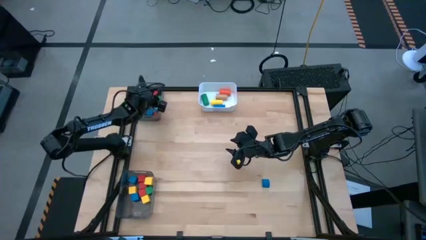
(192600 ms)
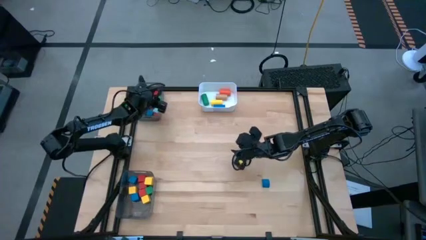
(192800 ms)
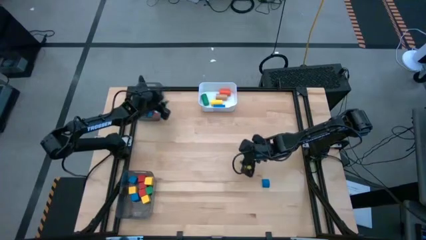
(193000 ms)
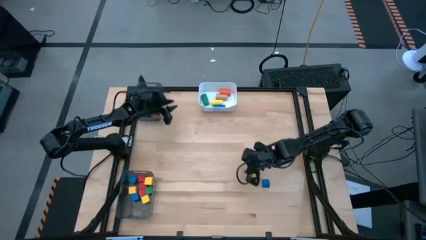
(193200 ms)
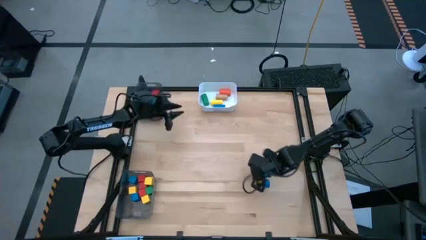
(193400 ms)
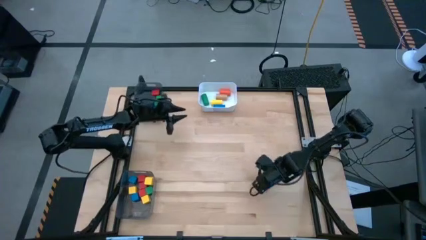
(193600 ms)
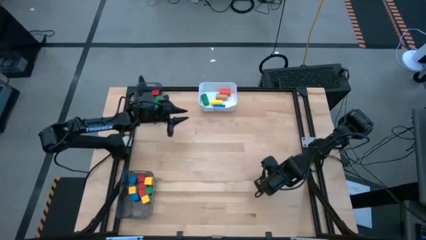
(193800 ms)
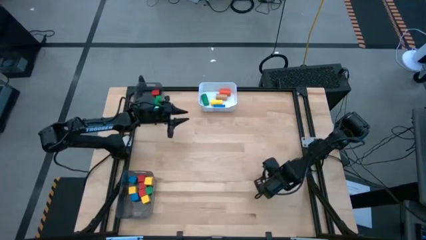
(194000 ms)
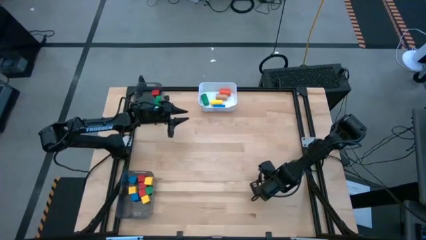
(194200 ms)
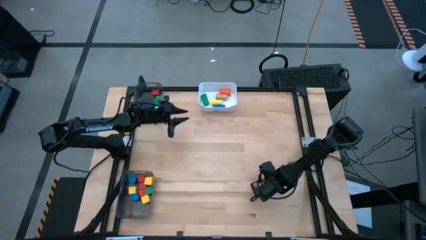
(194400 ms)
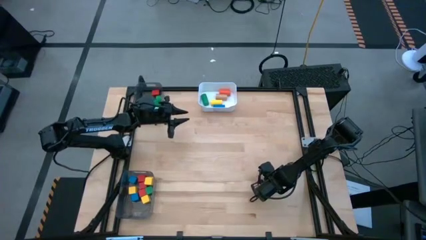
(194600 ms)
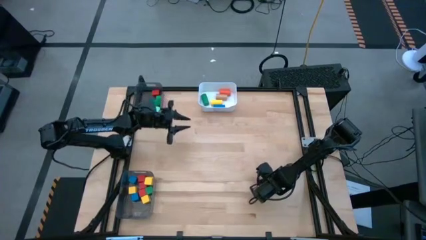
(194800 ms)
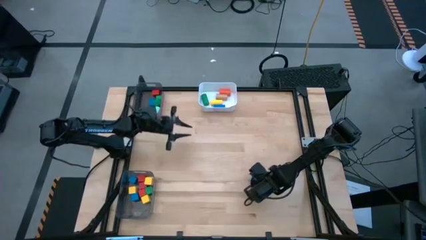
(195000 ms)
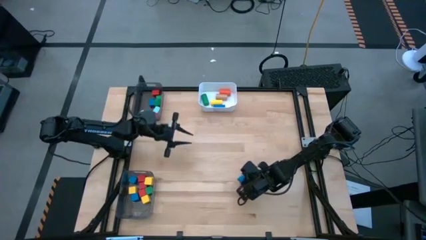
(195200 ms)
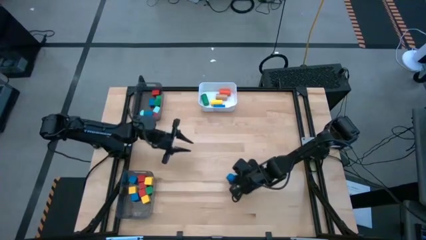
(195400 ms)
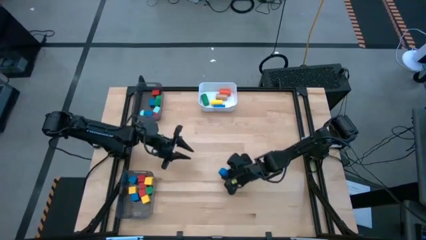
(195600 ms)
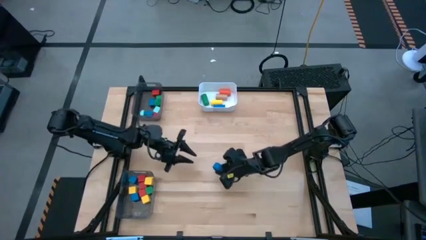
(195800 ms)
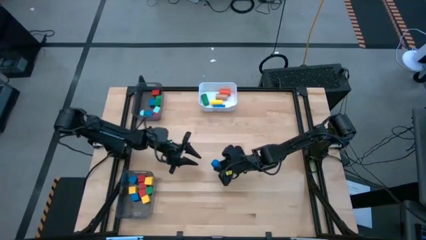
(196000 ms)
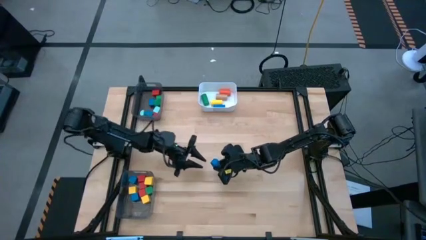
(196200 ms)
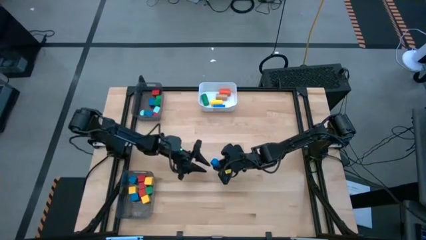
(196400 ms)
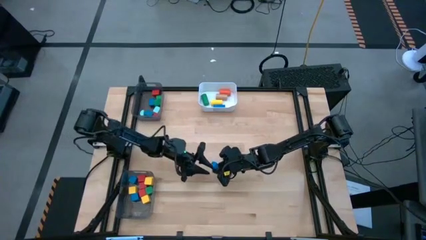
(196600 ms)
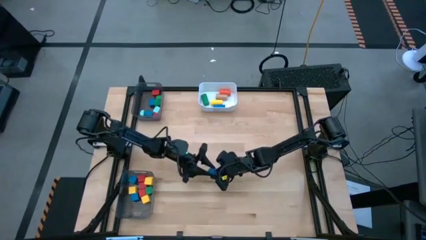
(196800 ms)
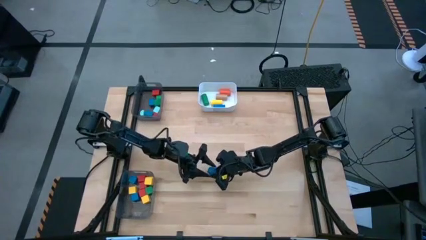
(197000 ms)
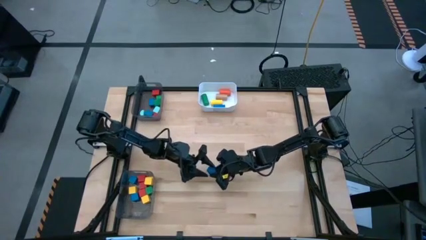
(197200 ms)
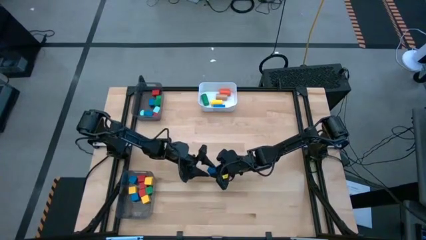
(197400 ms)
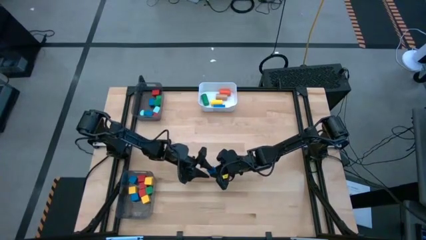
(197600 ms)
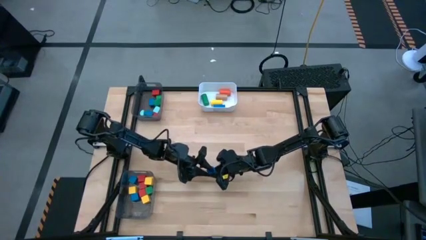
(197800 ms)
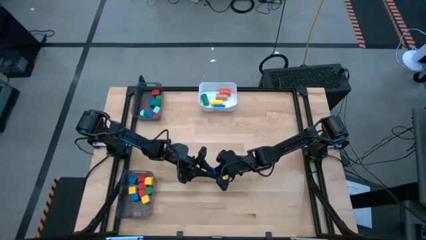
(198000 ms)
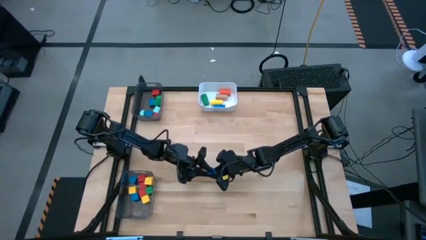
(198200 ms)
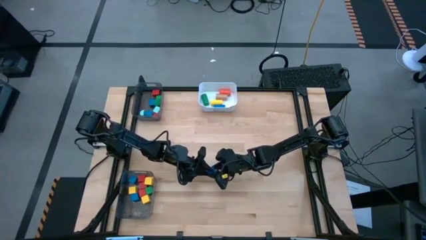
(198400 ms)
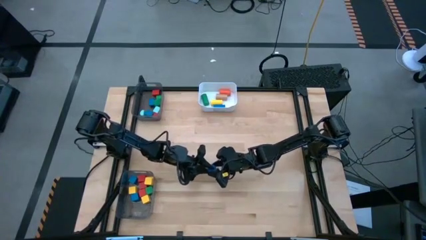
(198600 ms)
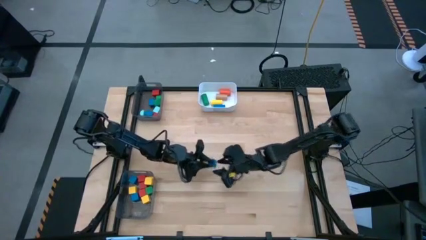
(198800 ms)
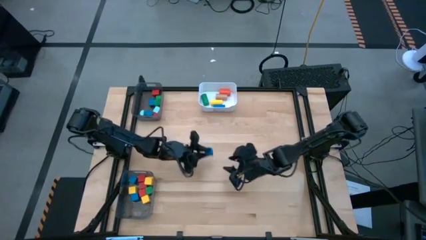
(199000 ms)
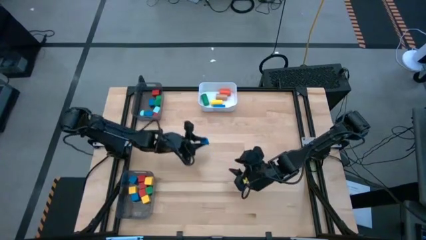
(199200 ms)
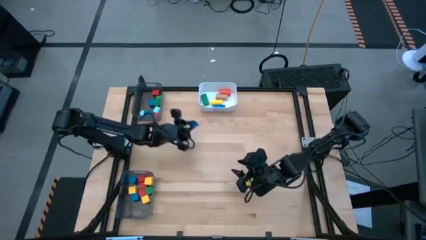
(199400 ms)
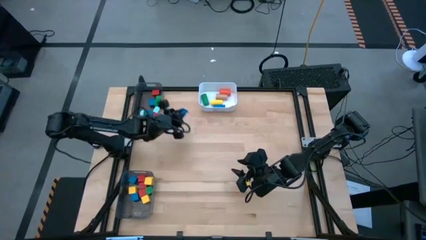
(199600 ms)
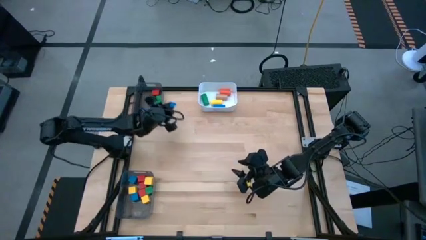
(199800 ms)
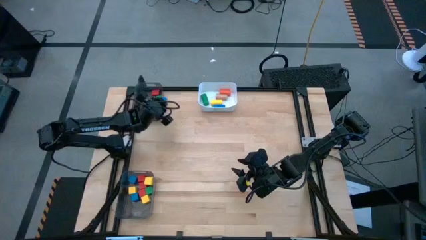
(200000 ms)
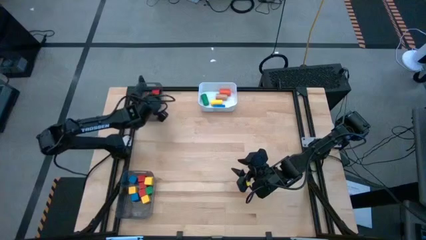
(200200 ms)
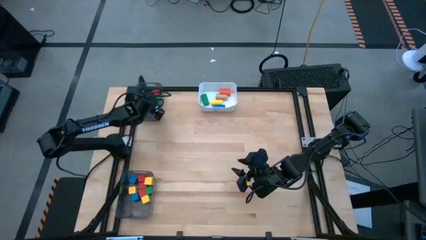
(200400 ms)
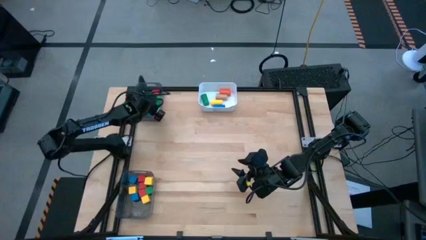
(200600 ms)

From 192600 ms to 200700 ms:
Task: Sort blocks by size
Put the dark blue semicircle block into the top black bin

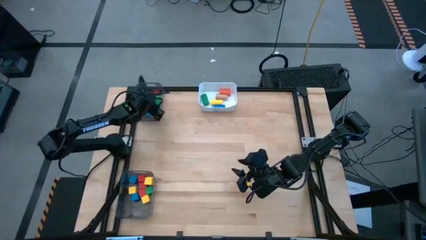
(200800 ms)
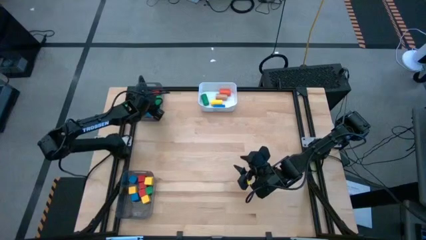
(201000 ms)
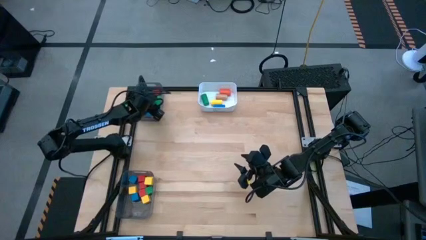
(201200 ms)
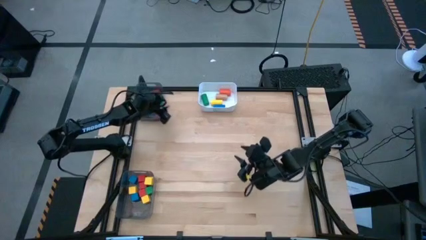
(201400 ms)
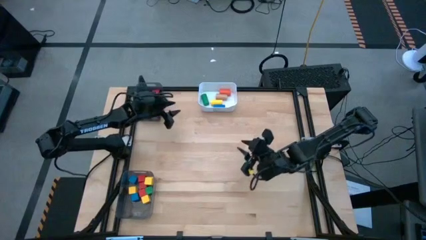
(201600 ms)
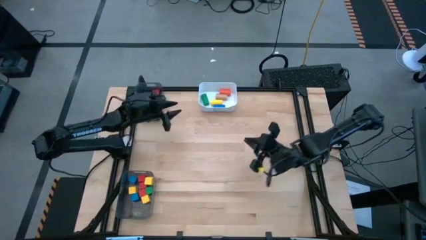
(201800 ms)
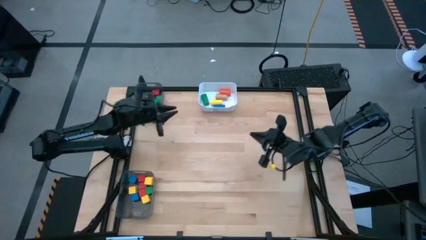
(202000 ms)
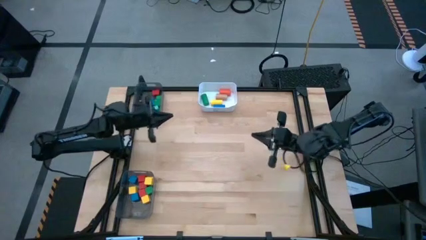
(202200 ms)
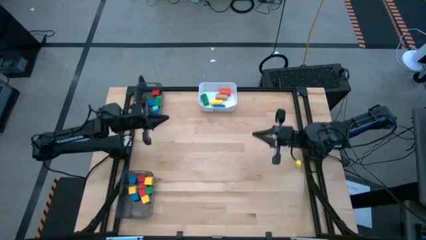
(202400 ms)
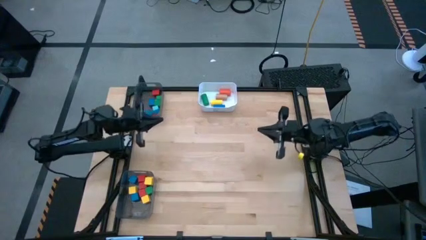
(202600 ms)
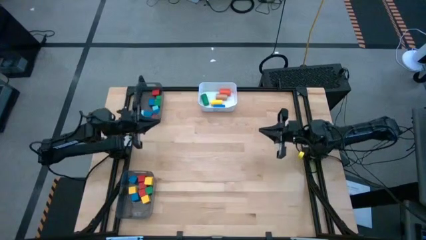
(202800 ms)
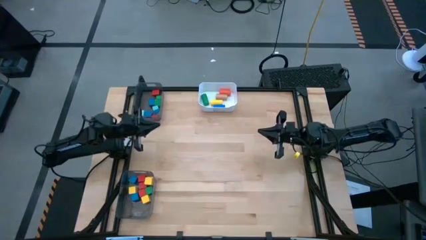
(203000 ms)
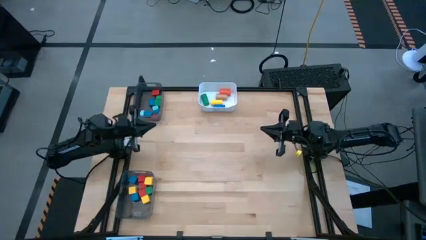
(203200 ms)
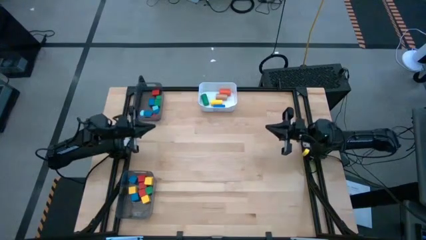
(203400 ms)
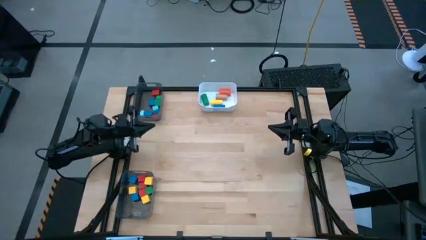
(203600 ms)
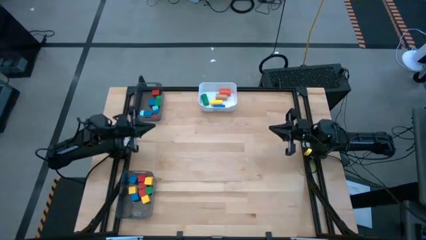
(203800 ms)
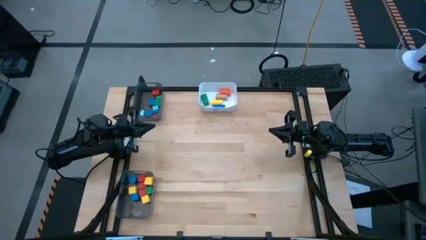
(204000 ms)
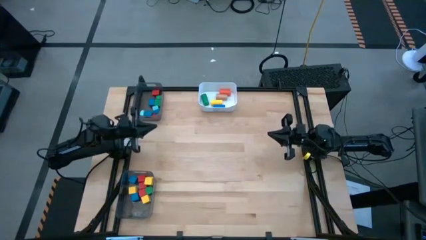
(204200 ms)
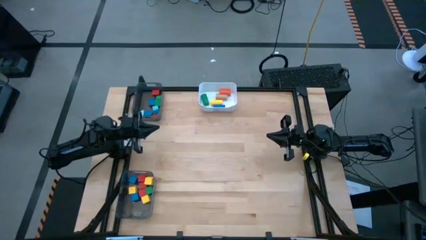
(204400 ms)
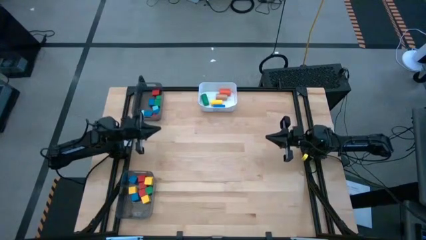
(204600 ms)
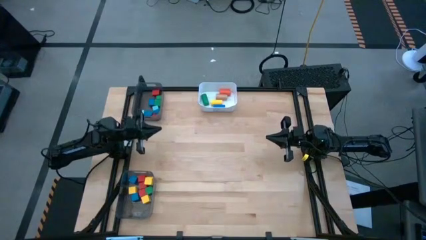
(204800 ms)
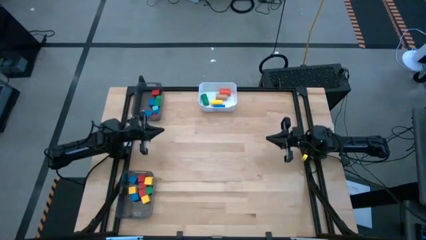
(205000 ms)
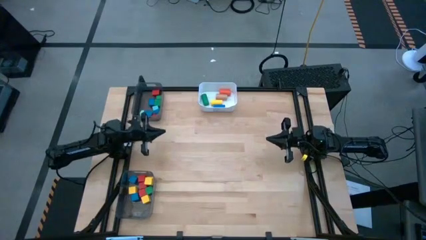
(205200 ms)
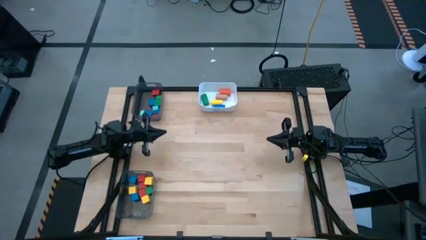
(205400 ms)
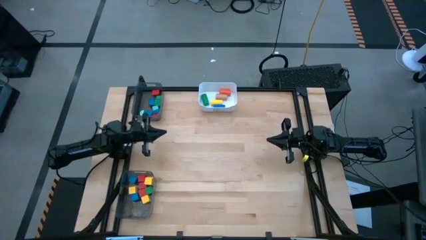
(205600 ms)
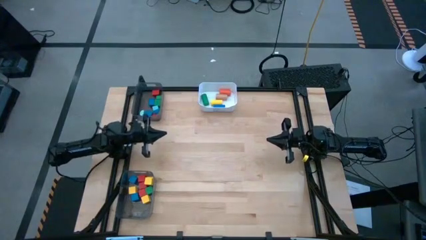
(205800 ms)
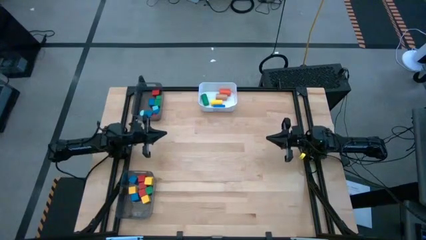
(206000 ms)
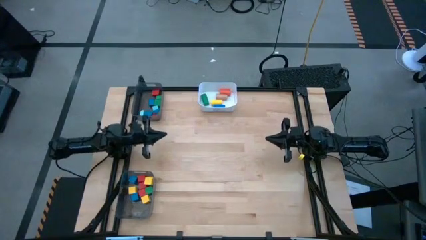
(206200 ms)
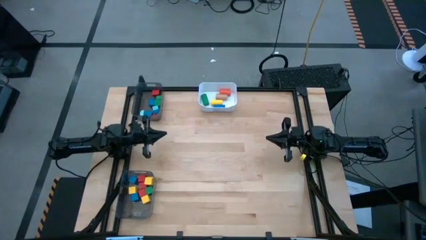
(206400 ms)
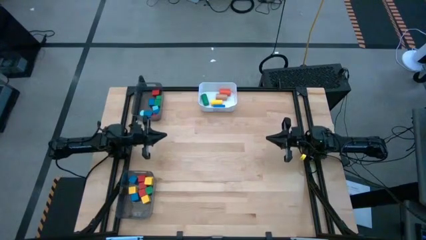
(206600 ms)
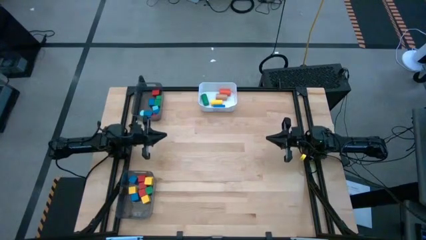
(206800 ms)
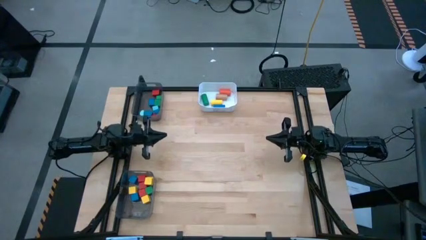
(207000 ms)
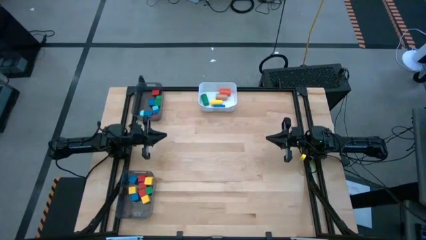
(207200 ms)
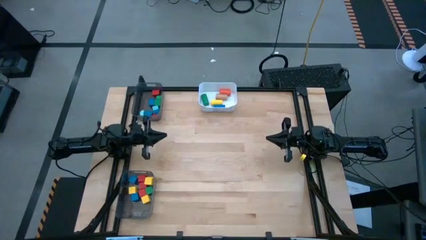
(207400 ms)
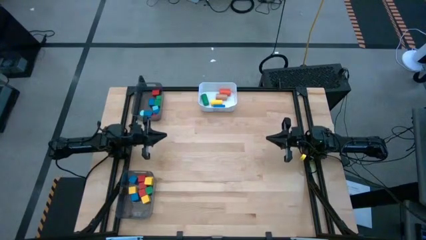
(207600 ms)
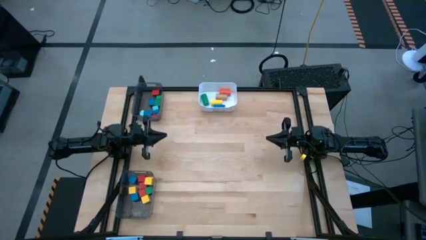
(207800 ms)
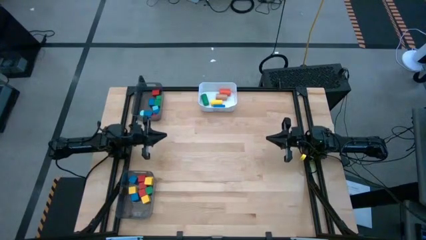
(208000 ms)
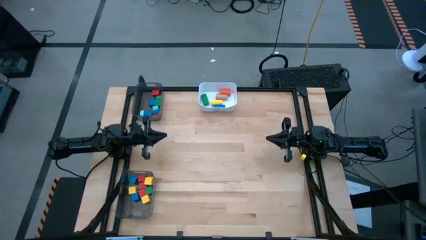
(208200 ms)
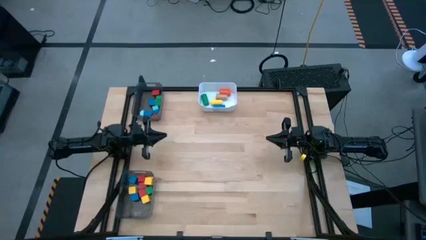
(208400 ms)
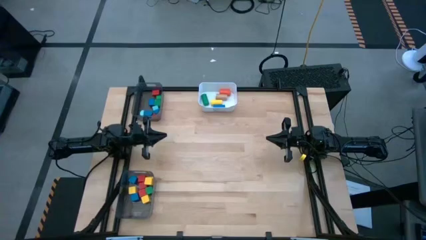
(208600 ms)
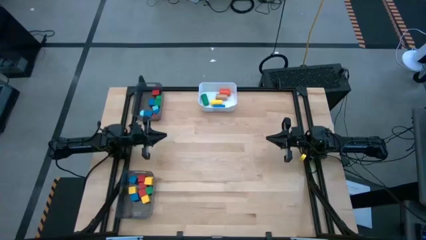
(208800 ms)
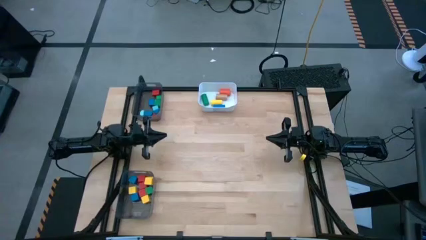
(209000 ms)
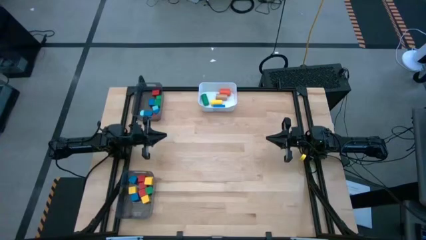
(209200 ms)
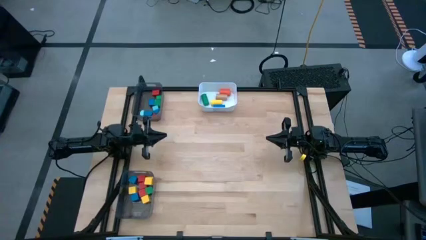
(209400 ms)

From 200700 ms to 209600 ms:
Return to Home Position
